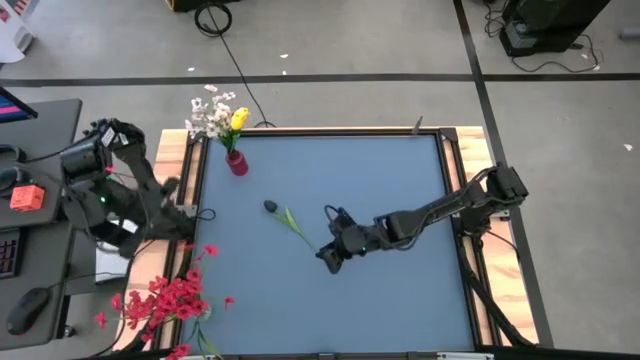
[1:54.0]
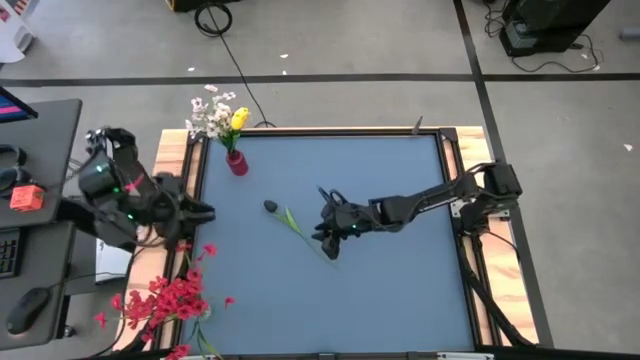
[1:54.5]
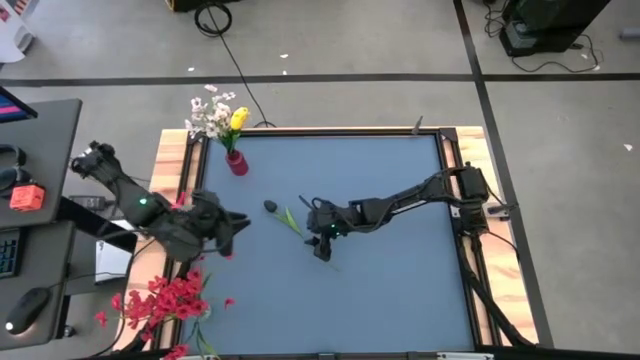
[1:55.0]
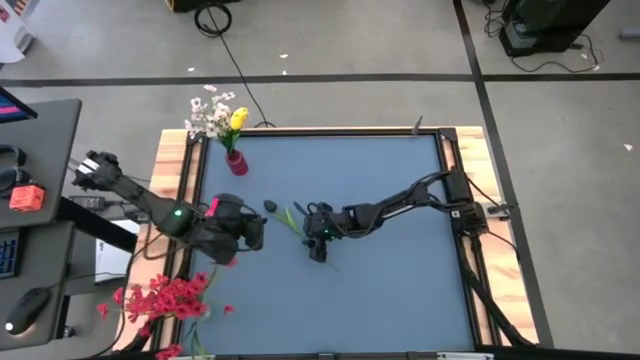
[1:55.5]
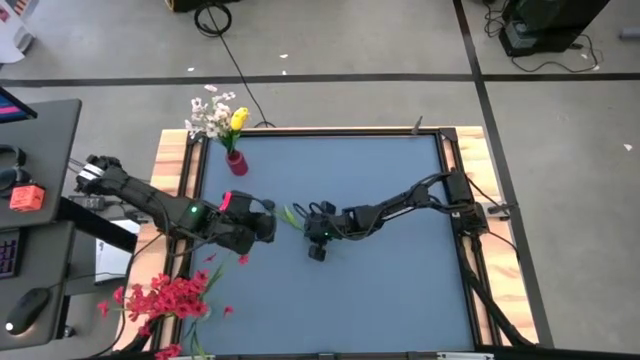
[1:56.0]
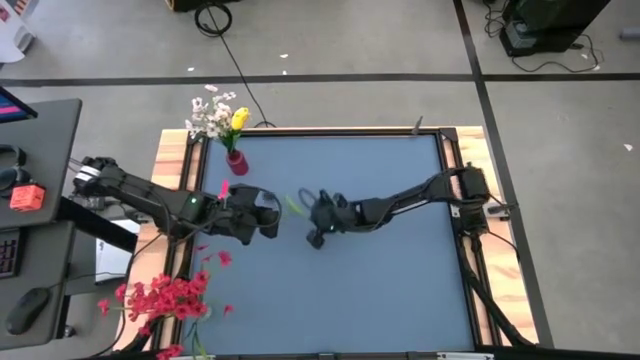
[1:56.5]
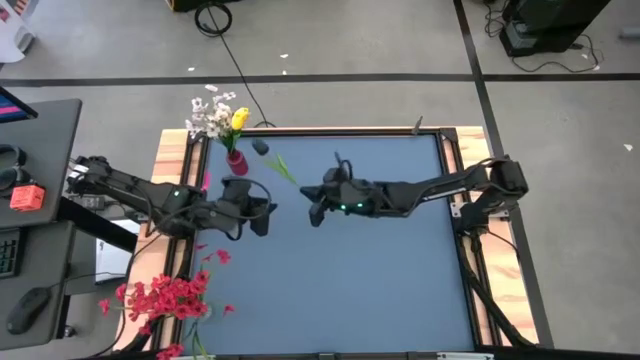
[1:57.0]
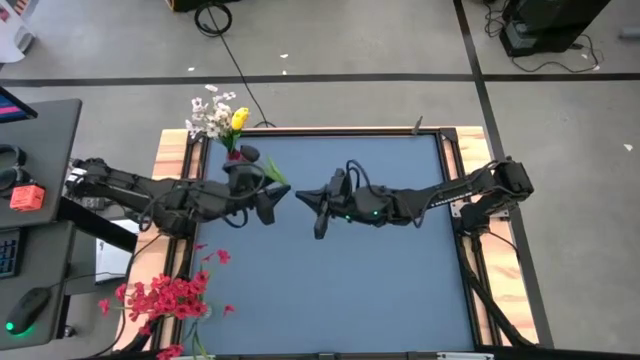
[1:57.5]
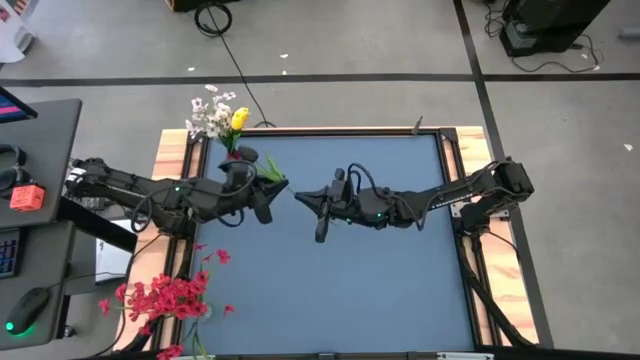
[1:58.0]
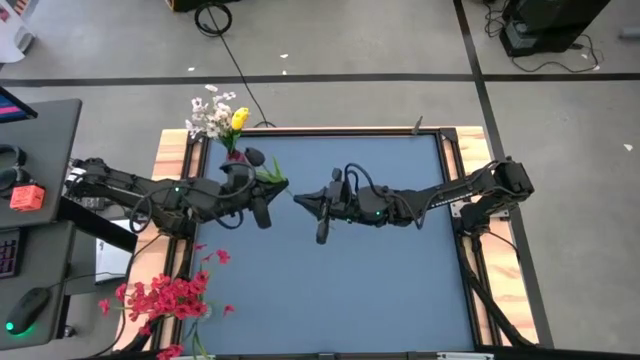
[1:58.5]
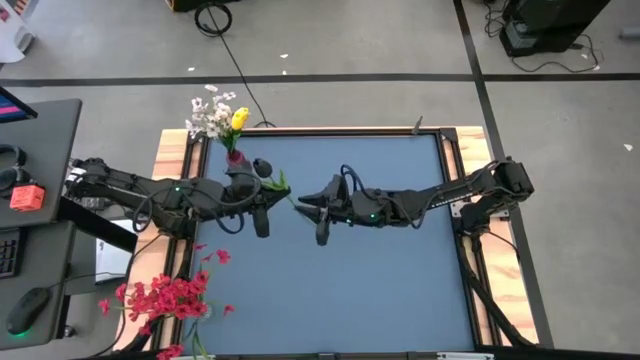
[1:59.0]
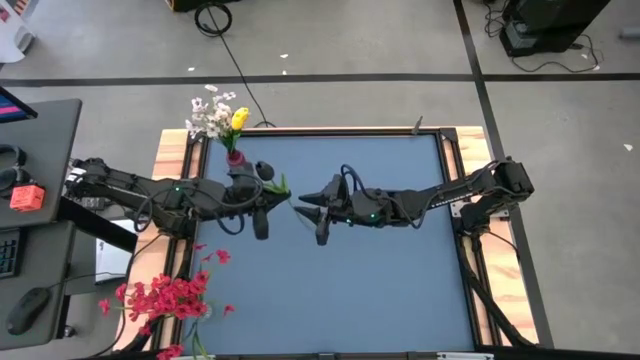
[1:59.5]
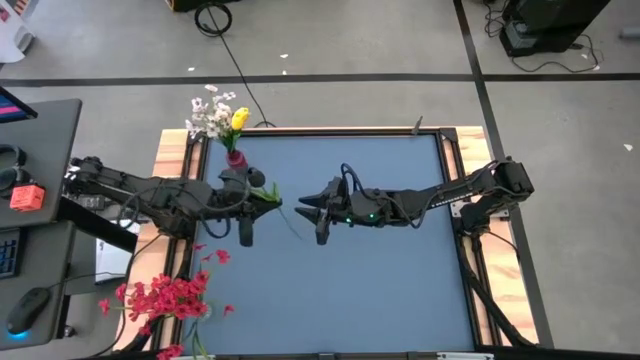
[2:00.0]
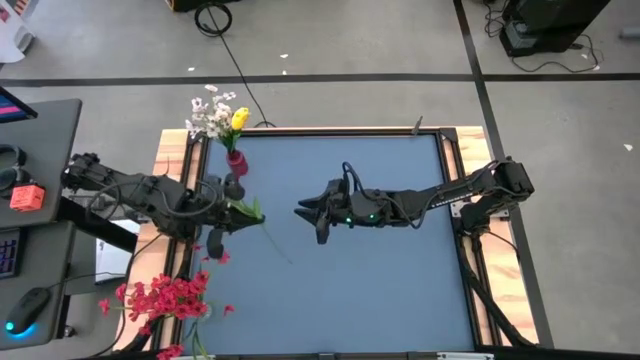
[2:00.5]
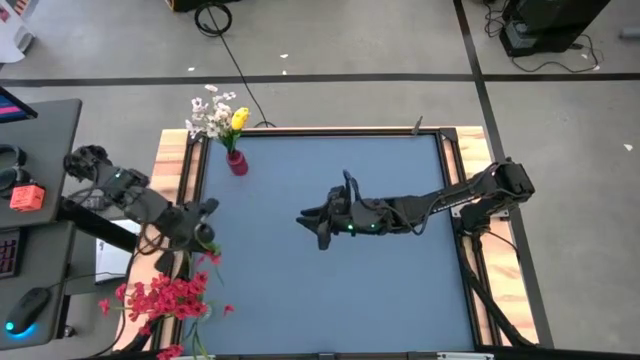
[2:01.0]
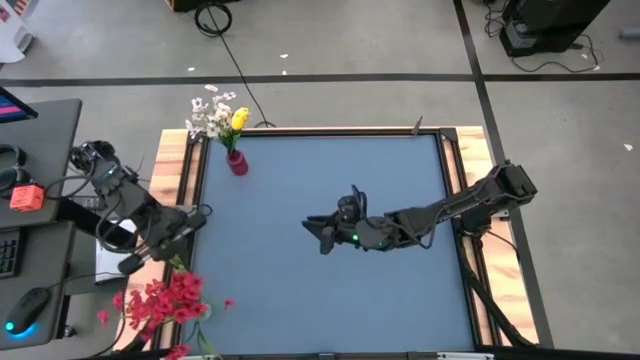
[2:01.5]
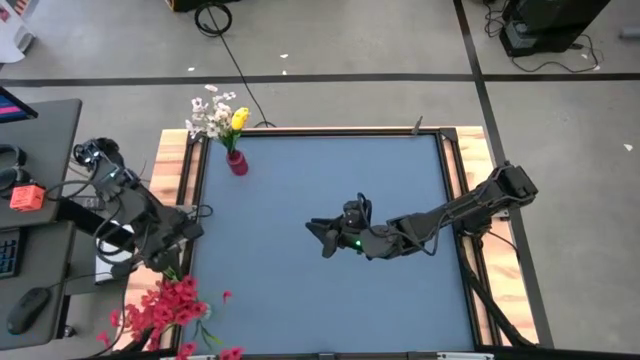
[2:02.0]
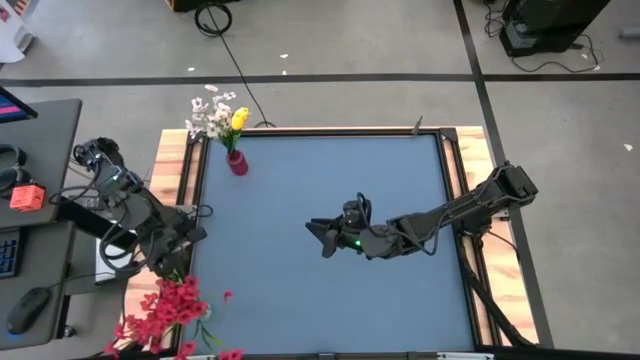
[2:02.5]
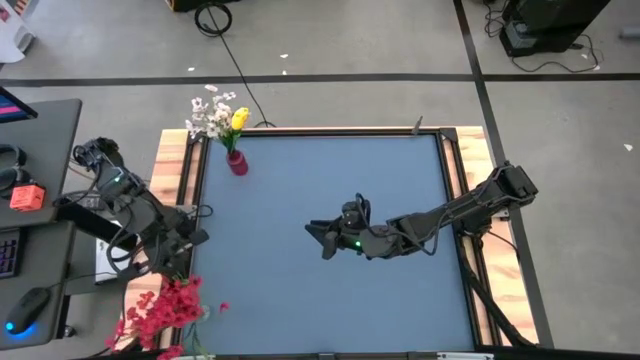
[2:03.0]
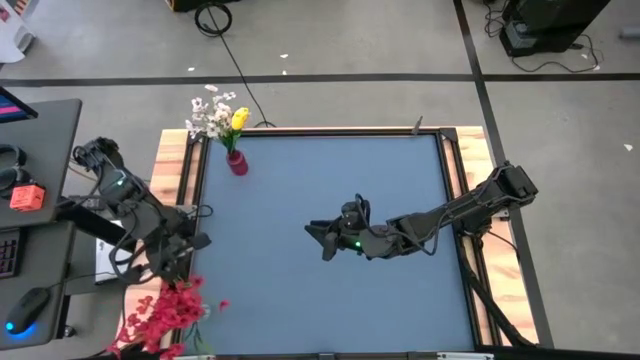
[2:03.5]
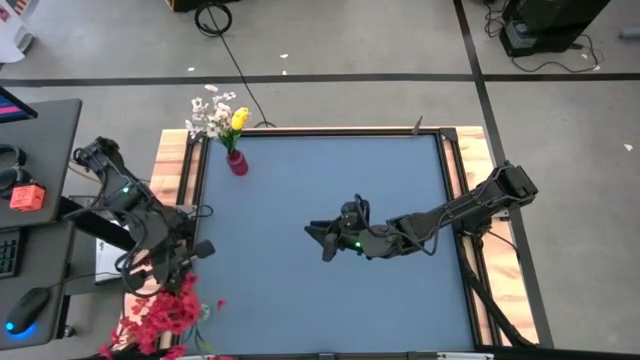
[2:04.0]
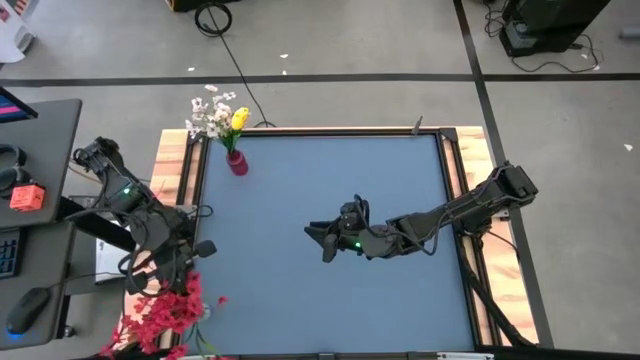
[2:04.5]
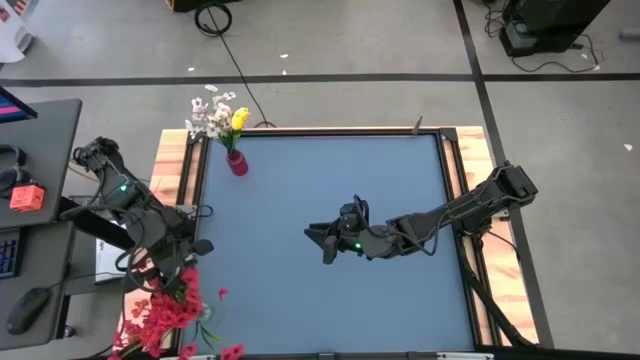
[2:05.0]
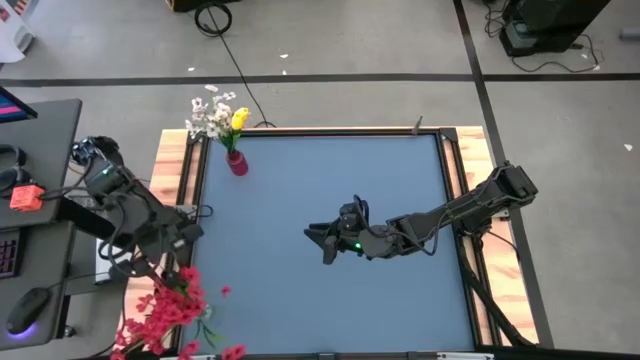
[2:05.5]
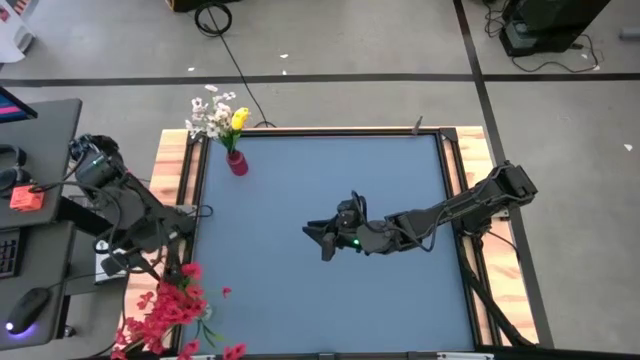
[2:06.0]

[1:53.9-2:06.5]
Task: Sort flowers into vase by color
Put the black tulip into the transparent vase

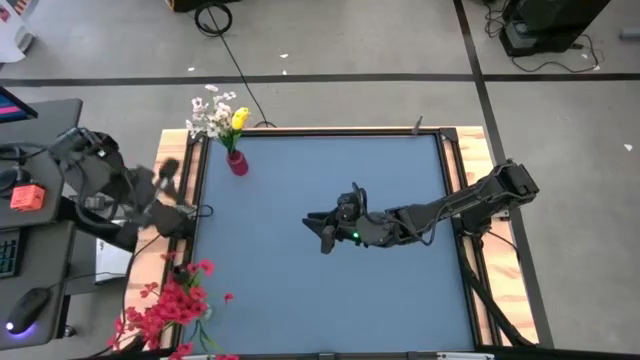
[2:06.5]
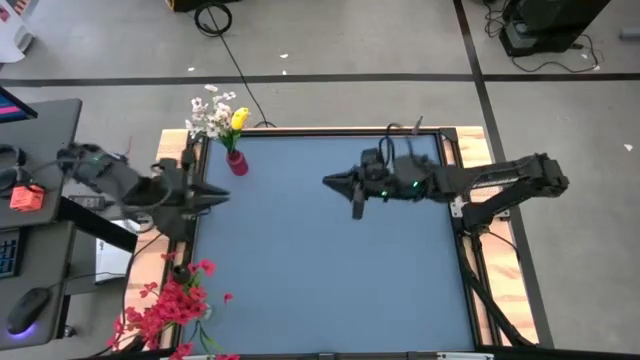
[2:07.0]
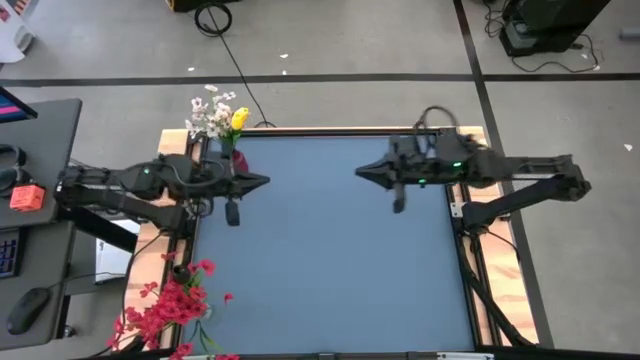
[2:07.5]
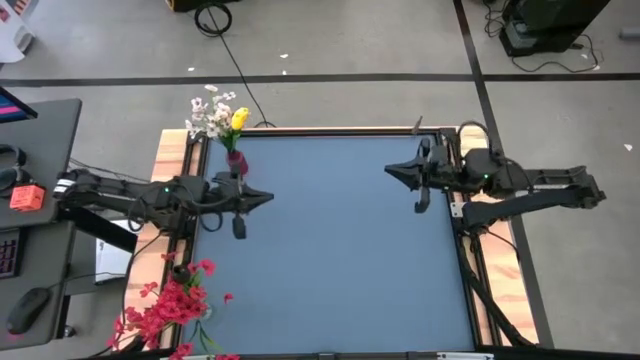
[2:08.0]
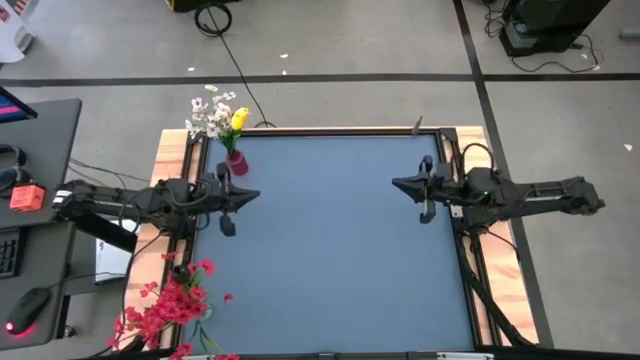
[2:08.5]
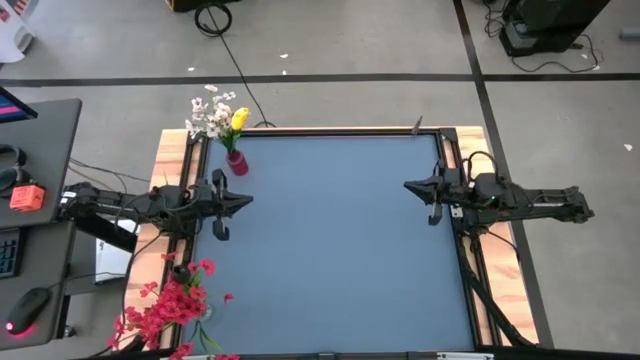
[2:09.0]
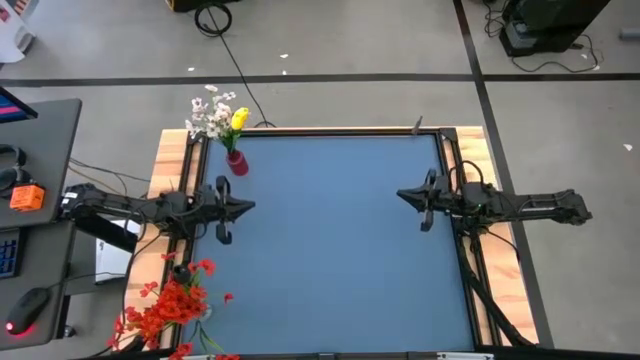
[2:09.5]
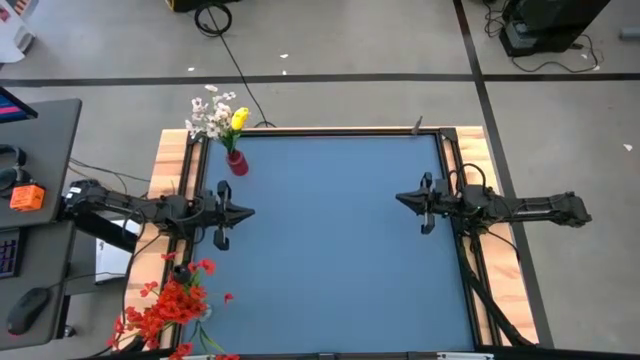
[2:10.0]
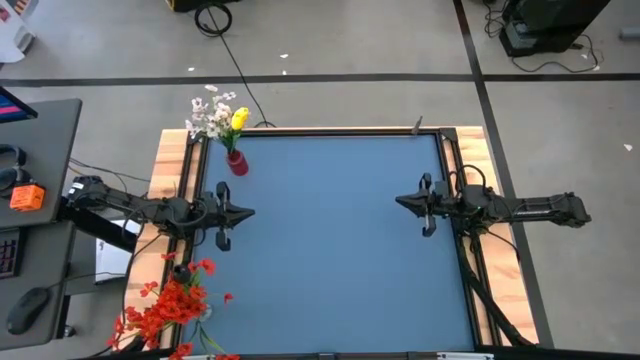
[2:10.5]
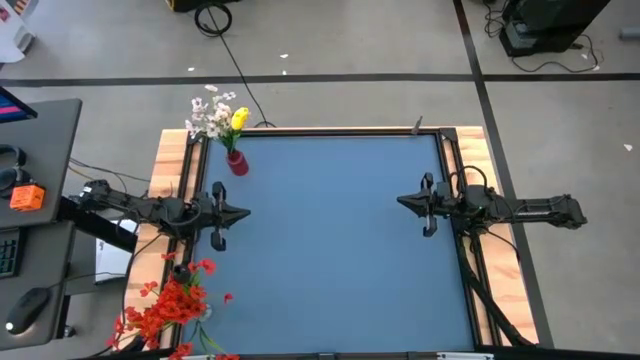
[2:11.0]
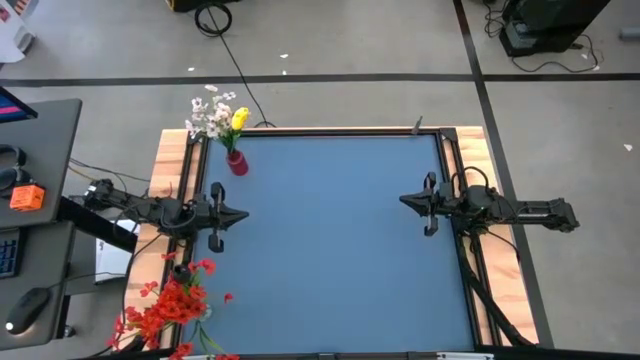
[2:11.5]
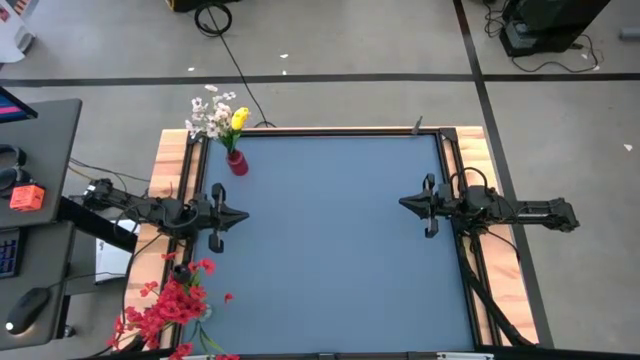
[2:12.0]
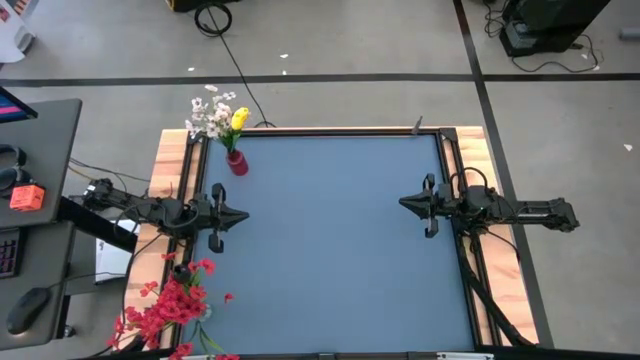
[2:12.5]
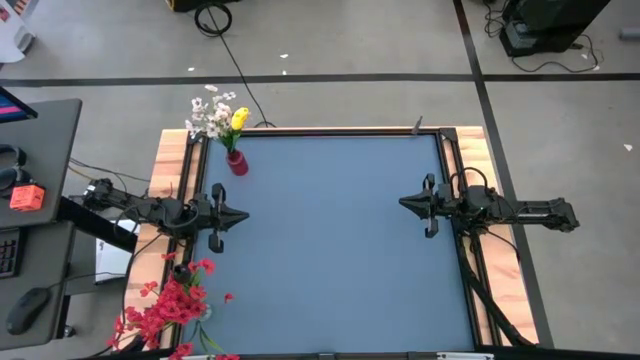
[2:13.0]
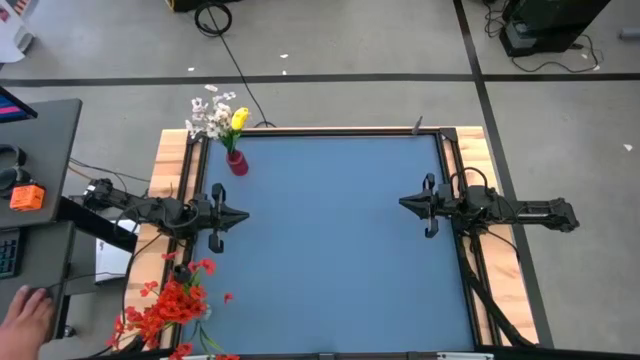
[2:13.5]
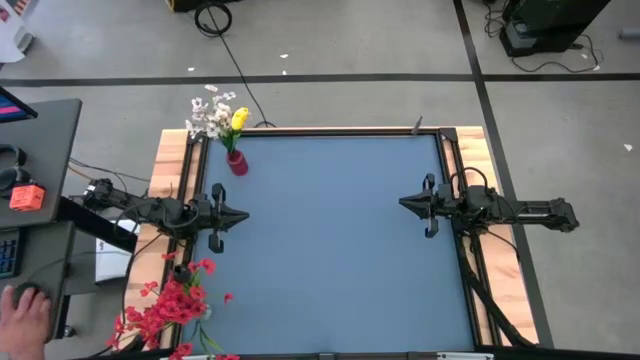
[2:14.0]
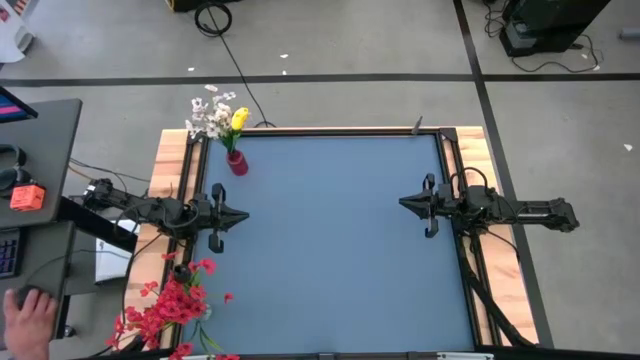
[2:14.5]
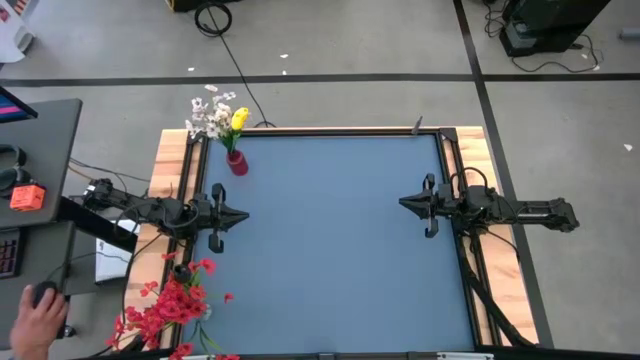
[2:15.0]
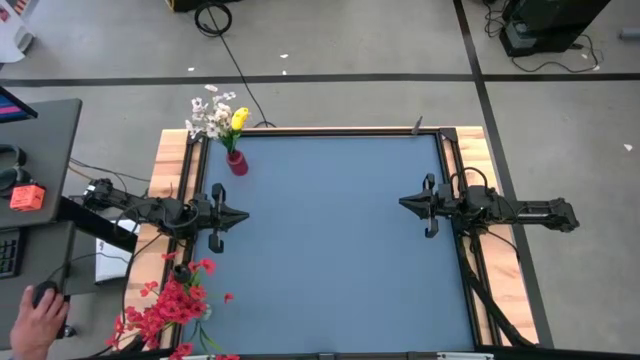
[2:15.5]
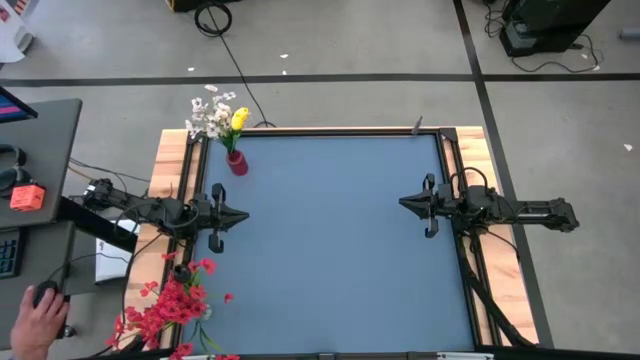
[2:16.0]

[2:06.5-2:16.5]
Return to Home Position
